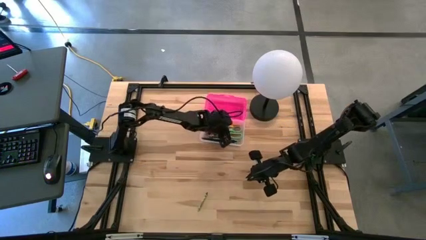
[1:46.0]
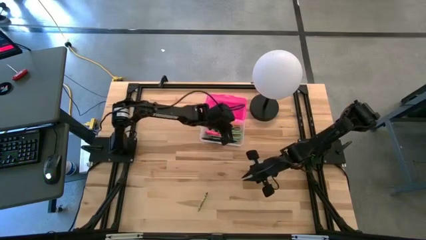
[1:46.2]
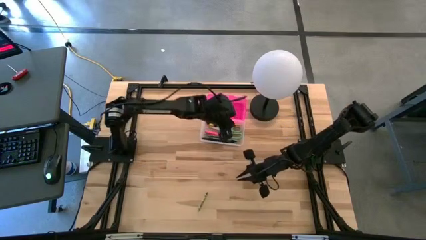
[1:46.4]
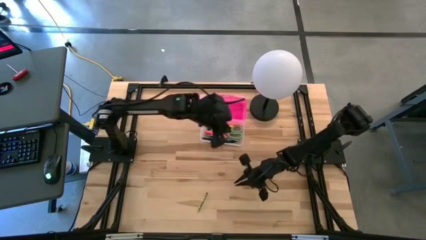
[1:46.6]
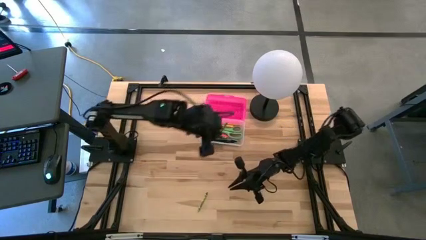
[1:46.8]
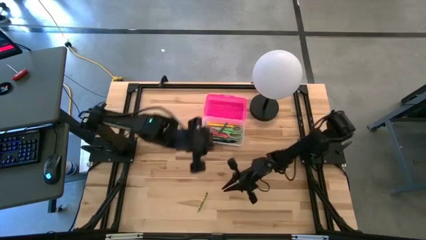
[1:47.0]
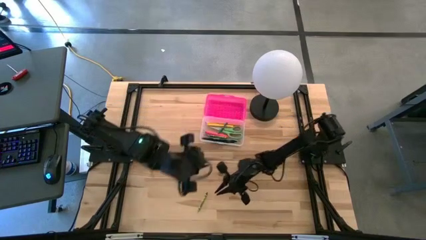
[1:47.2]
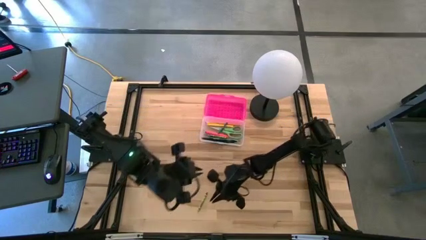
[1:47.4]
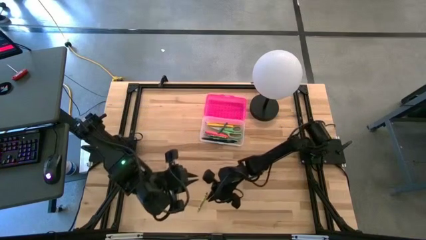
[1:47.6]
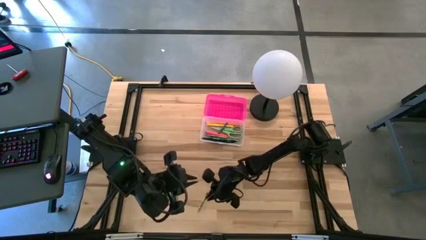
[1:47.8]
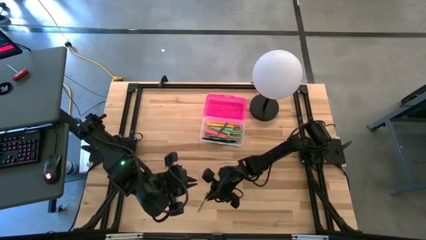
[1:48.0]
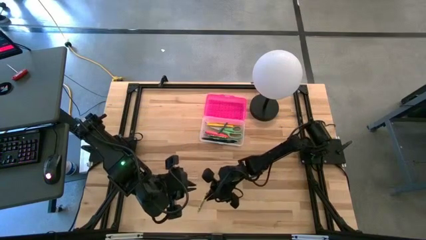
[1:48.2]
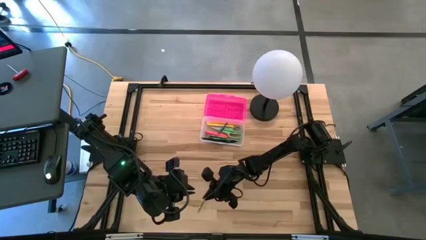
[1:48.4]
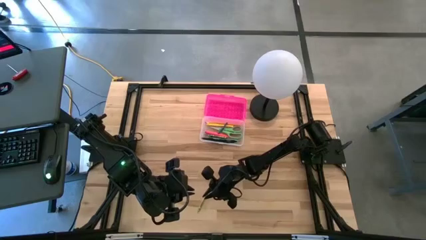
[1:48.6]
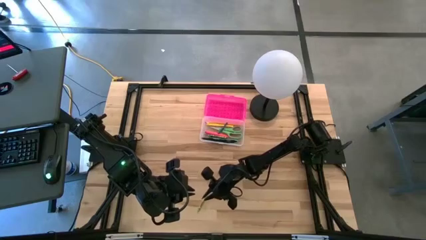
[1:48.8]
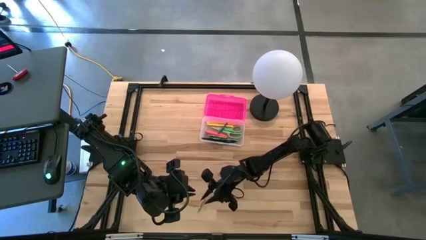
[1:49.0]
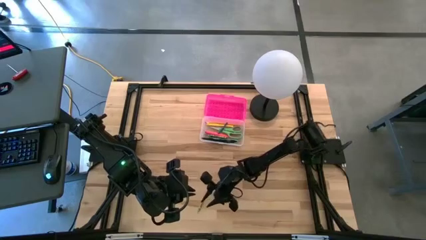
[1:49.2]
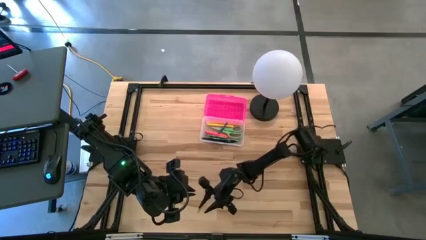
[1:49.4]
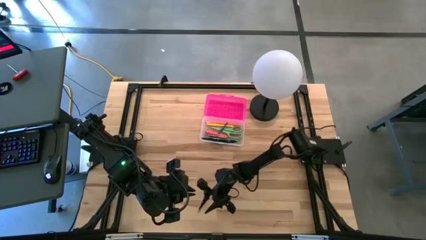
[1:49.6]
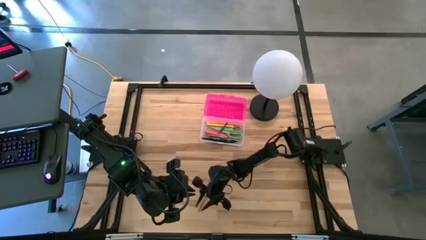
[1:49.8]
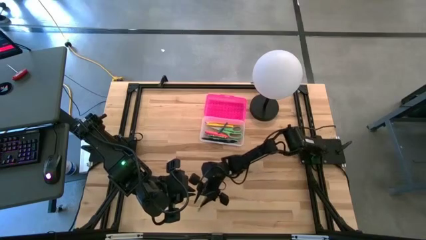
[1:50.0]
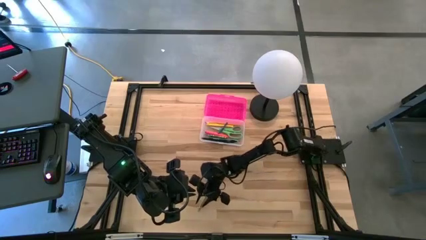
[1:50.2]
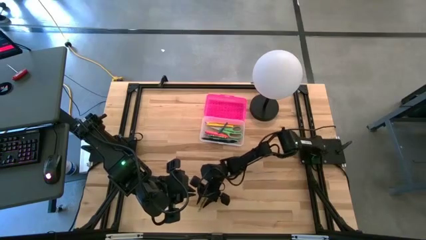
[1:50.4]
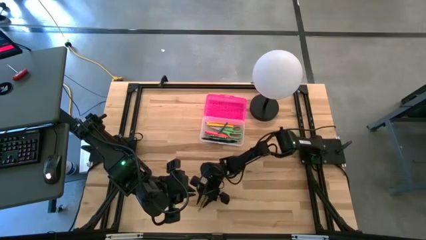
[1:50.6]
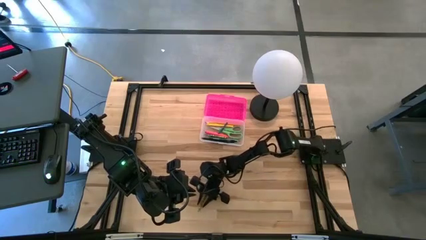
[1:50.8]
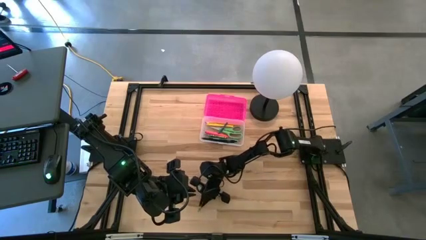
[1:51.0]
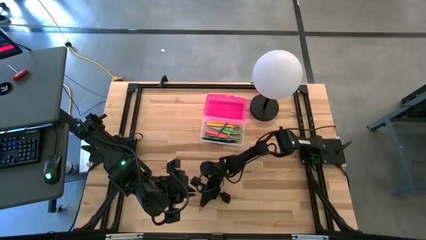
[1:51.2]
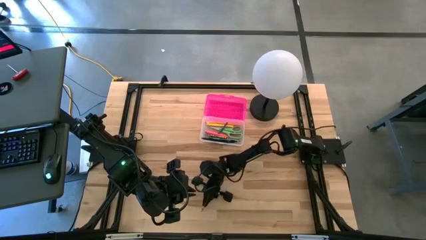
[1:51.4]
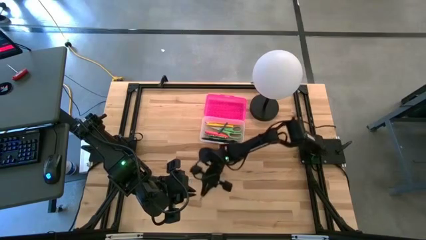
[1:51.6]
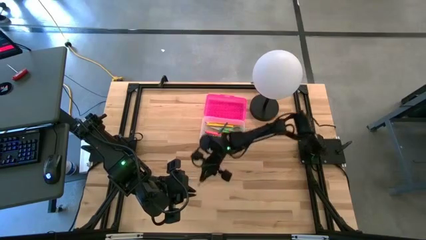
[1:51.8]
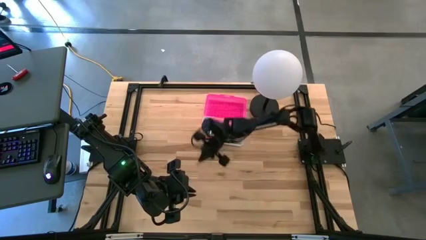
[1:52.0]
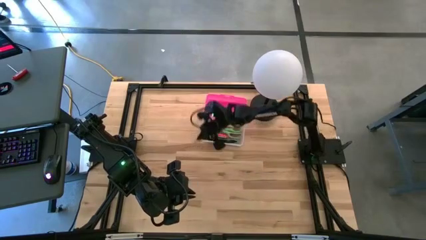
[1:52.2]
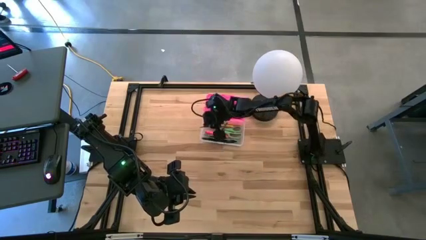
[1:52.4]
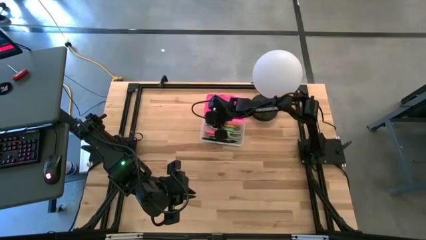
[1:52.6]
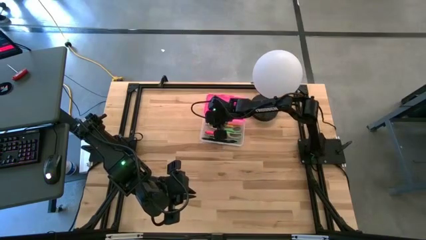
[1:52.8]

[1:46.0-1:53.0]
Task: Pick & place school supplies into a supply box
Put the green crayon into the transparent supply box

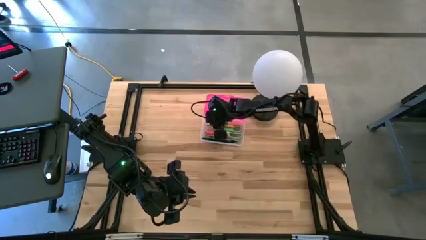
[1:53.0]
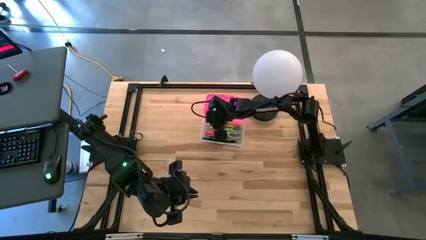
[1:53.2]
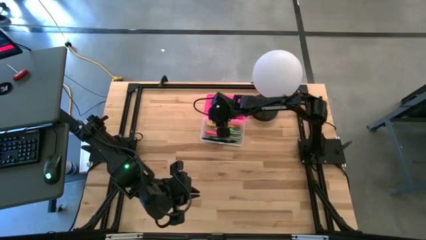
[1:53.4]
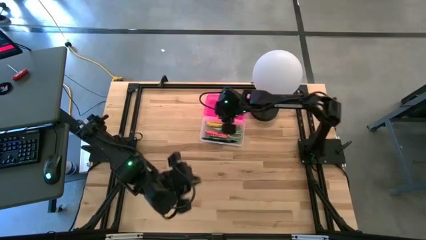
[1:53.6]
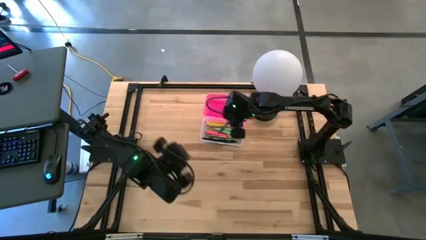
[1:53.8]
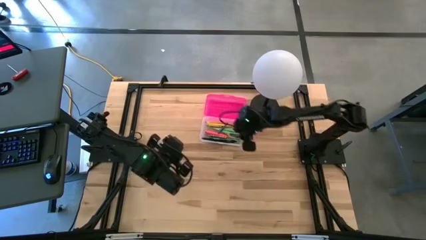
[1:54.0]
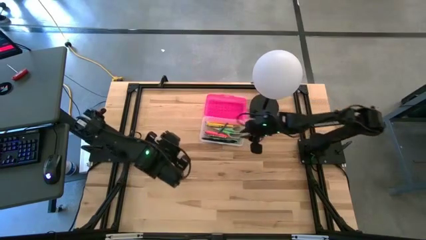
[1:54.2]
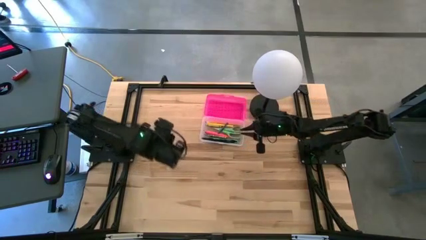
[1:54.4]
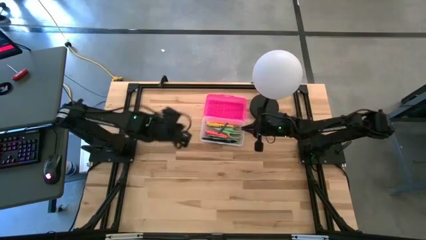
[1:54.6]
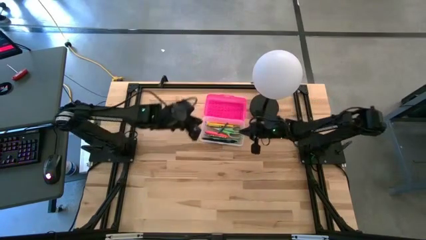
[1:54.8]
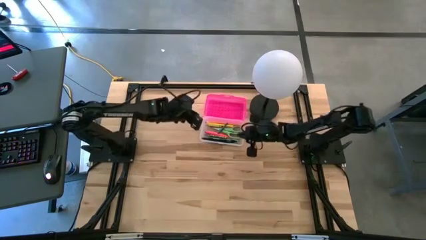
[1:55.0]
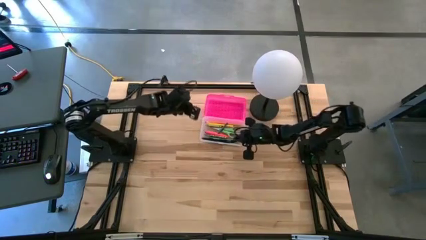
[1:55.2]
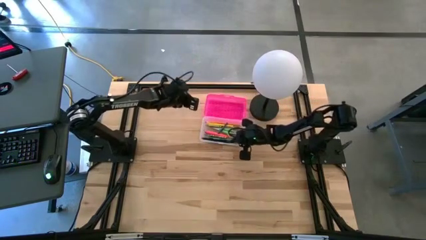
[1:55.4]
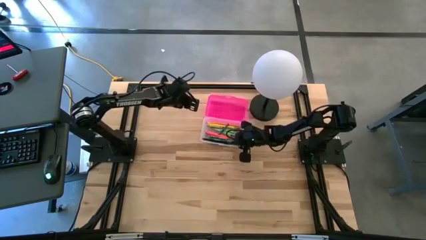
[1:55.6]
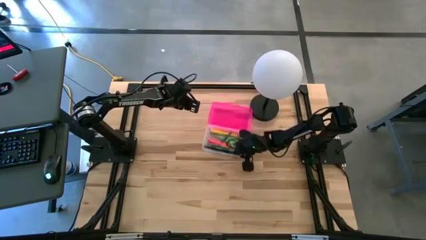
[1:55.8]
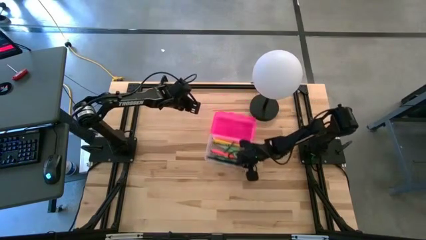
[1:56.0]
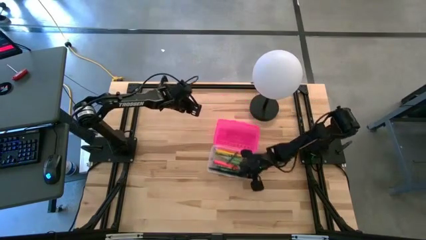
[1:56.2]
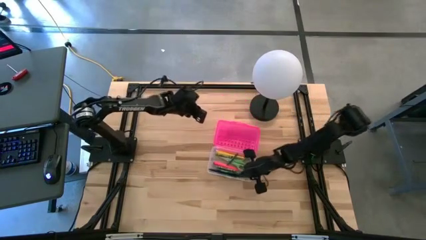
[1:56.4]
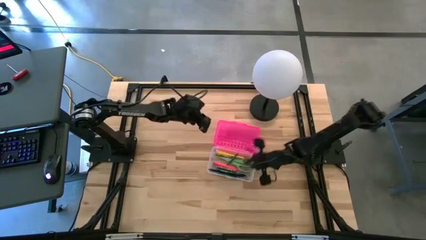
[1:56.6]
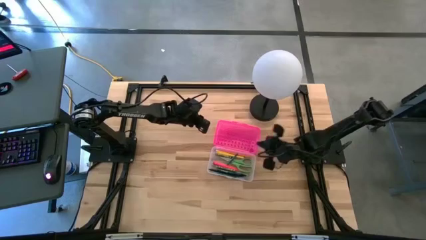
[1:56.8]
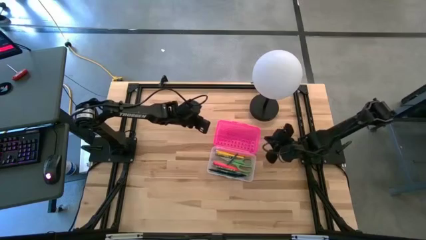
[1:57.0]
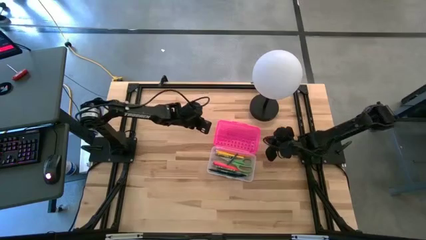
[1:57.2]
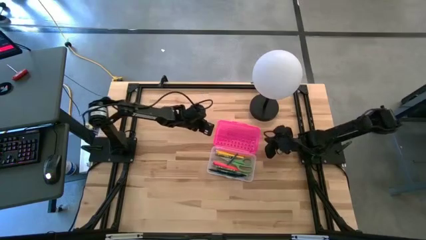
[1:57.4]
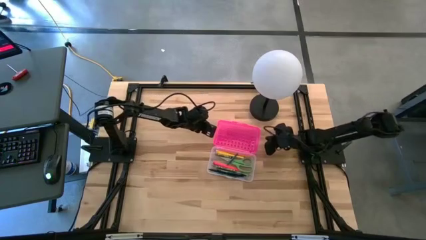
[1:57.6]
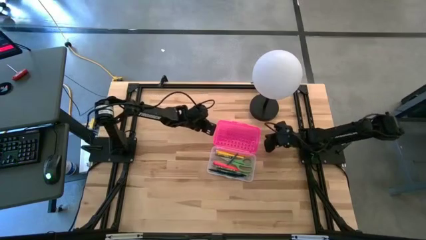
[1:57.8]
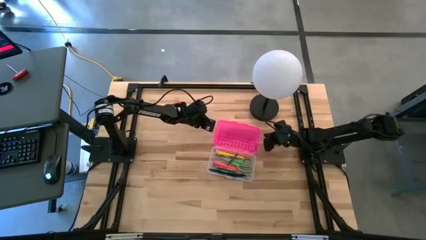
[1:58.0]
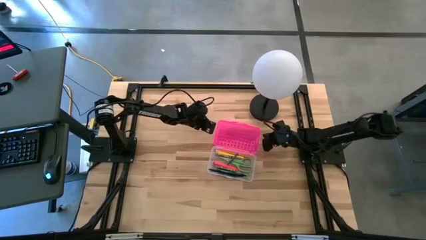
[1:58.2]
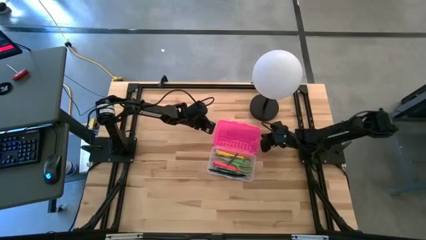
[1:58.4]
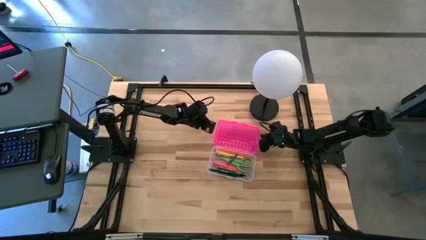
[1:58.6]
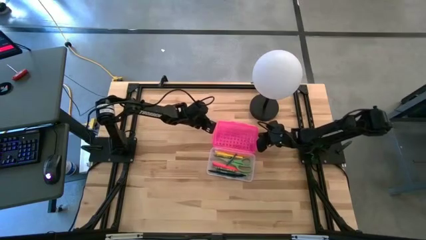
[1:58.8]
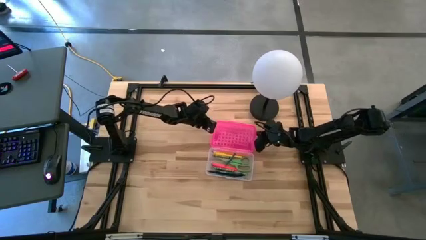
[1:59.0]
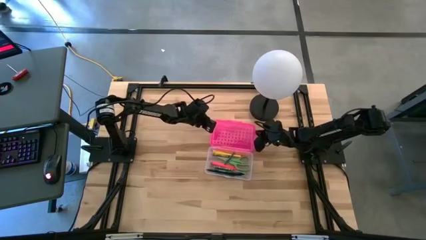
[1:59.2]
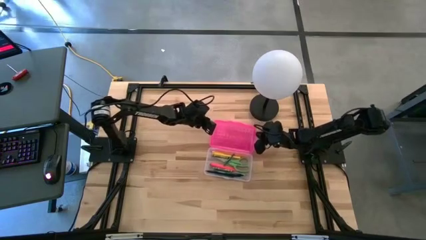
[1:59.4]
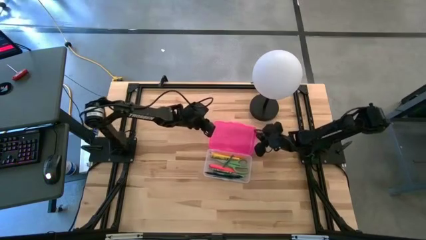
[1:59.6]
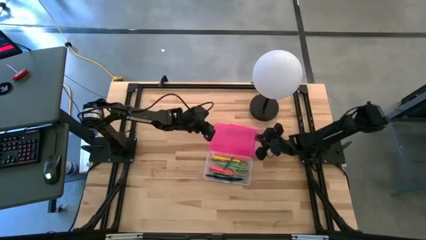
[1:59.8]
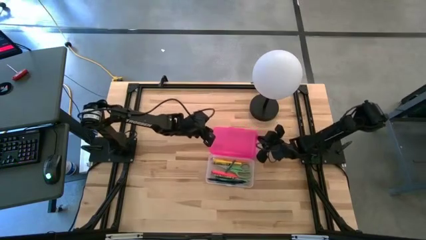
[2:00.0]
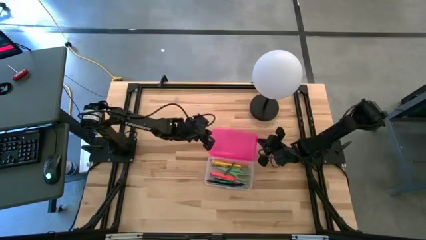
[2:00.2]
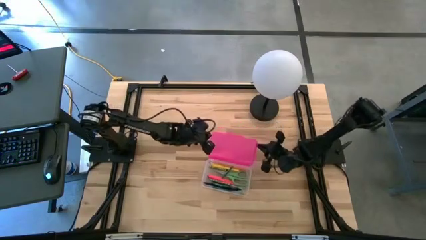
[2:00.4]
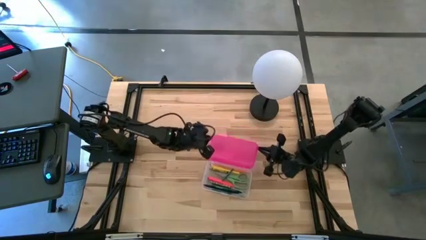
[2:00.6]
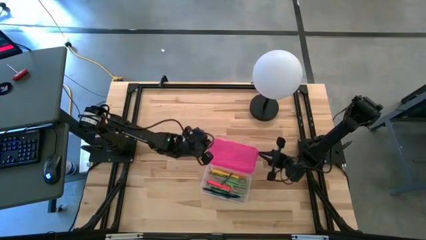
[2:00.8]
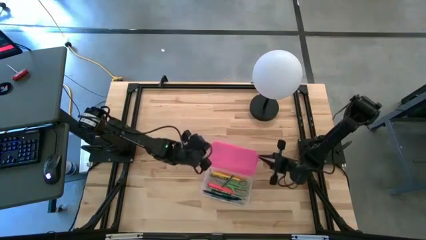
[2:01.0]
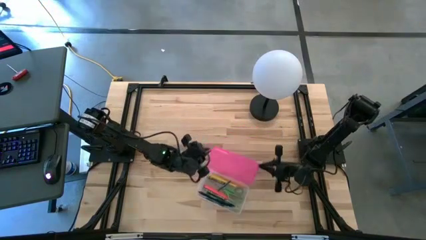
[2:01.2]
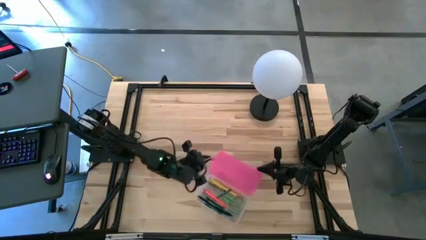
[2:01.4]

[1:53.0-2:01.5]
Close the transparent supply box

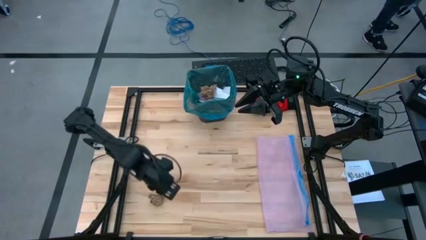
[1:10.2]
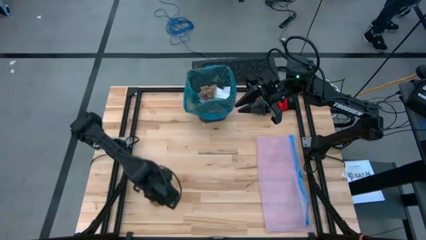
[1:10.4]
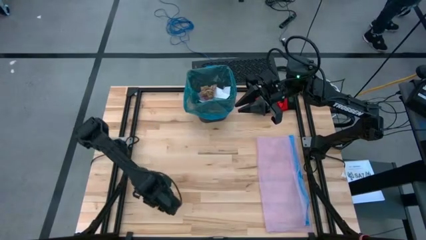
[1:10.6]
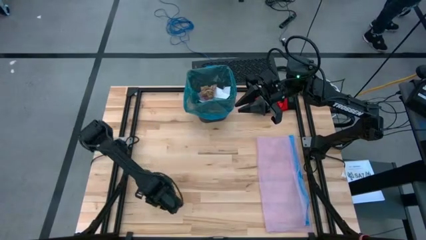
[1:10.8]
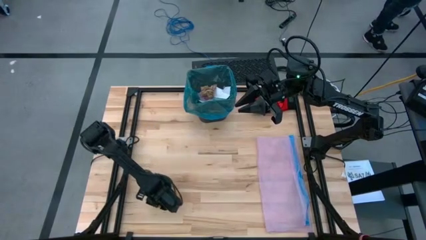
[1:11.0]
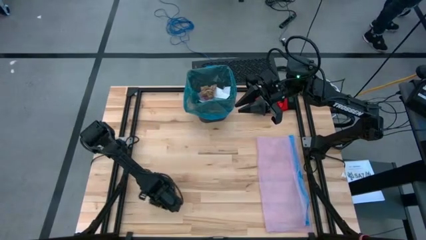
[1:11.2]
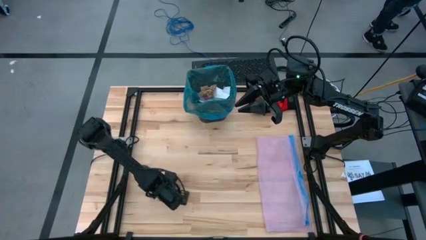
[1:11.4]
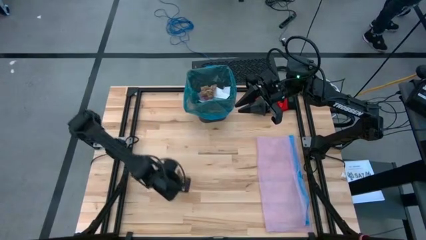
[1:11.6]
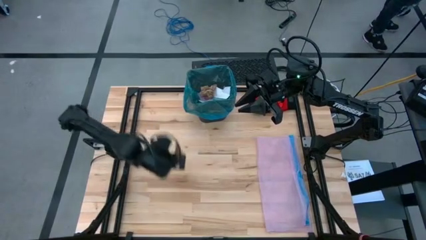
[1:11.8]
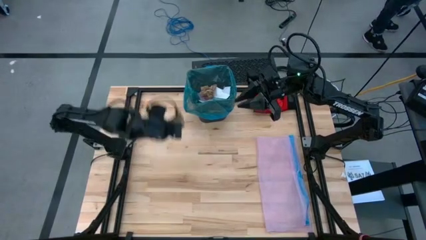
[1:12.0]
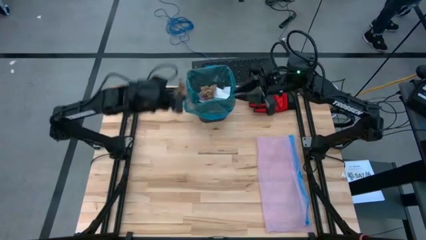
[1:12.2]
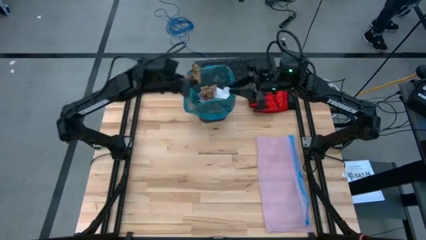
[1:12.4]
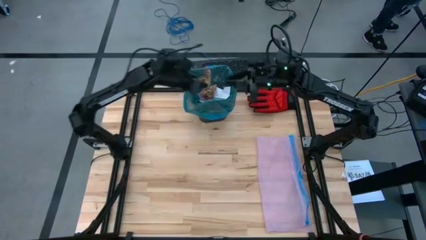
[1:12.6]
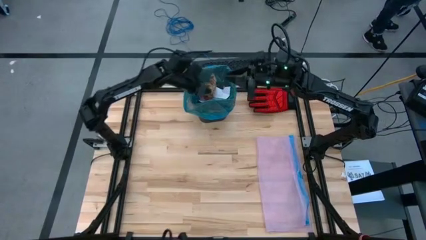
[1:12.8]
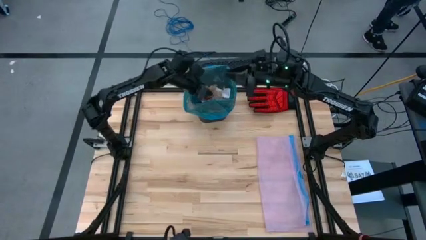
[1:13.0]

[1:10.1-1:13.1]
Task: place trash/remove bag and relplace
Put the brown napkin into the trash bin
